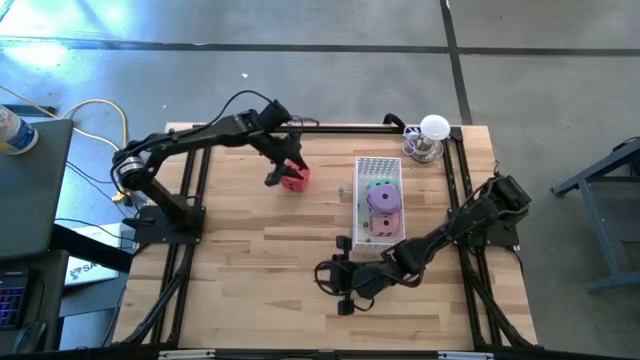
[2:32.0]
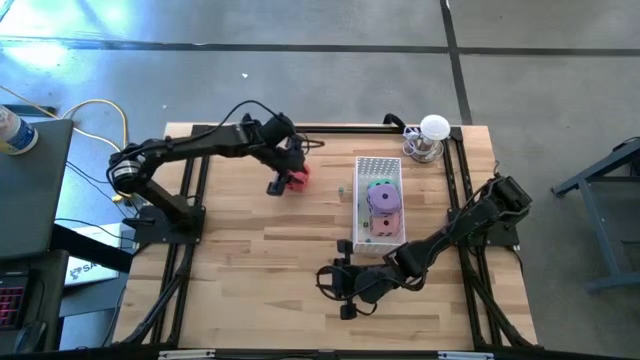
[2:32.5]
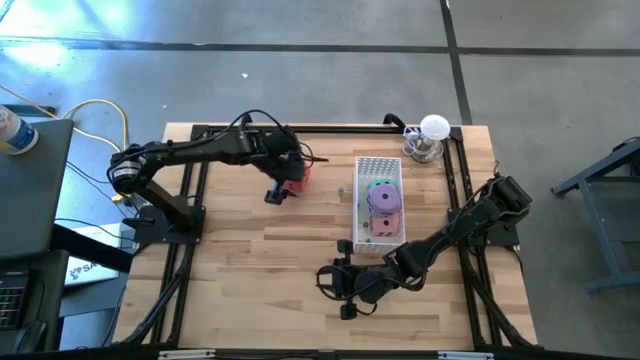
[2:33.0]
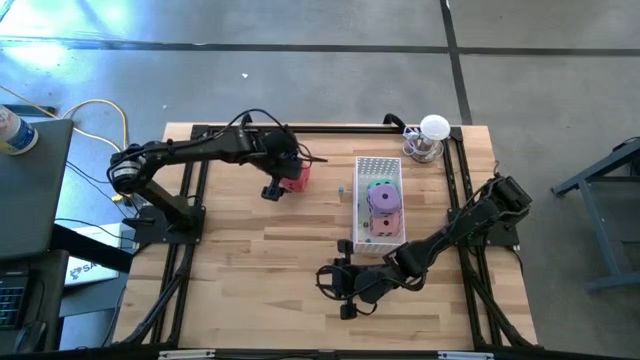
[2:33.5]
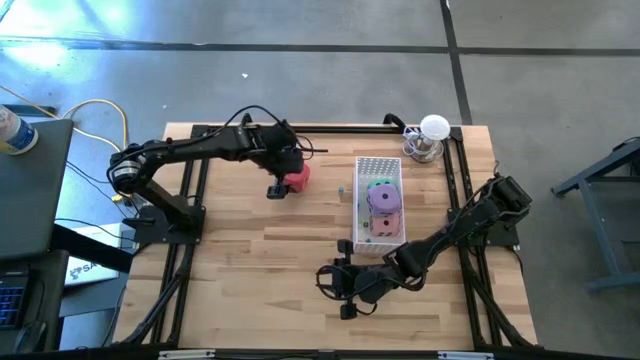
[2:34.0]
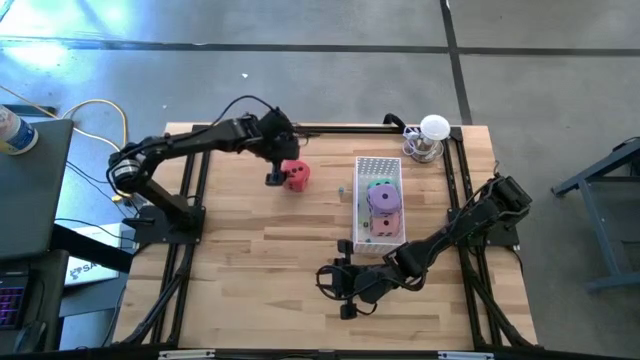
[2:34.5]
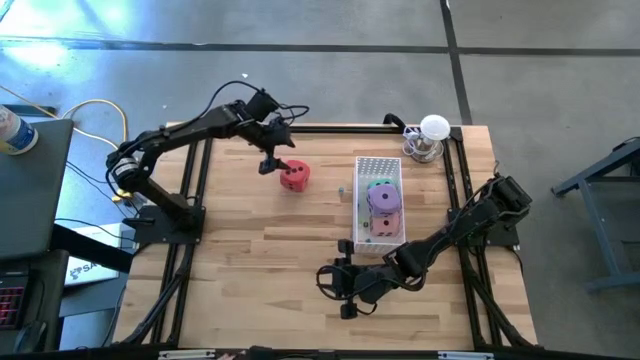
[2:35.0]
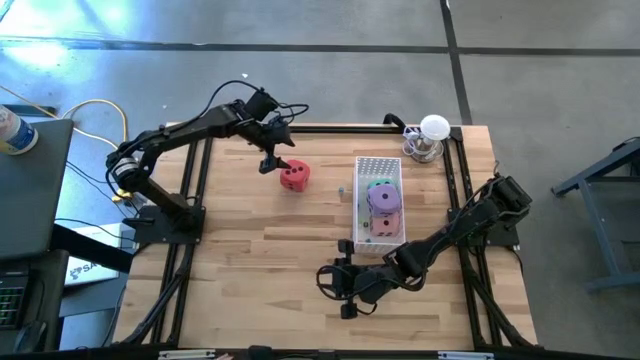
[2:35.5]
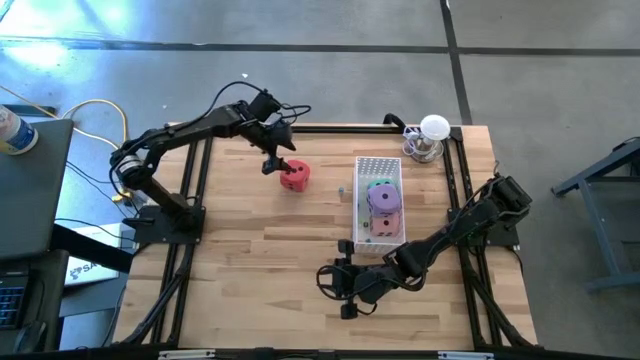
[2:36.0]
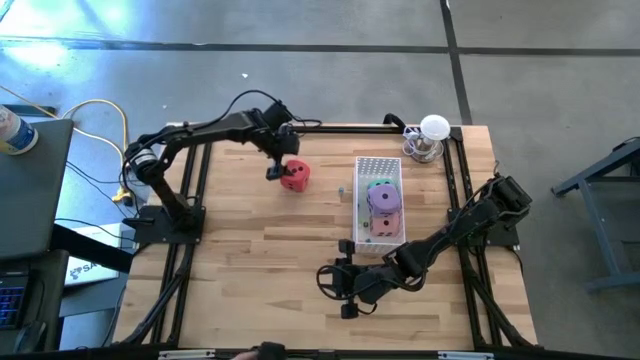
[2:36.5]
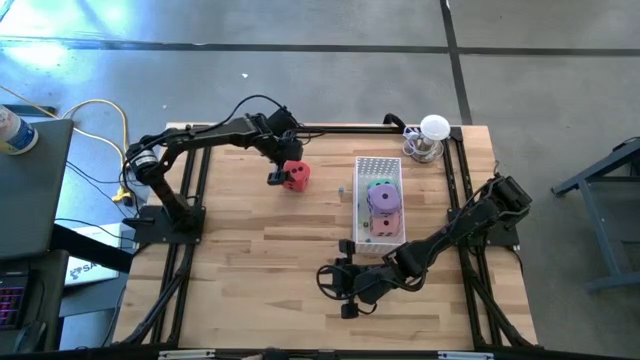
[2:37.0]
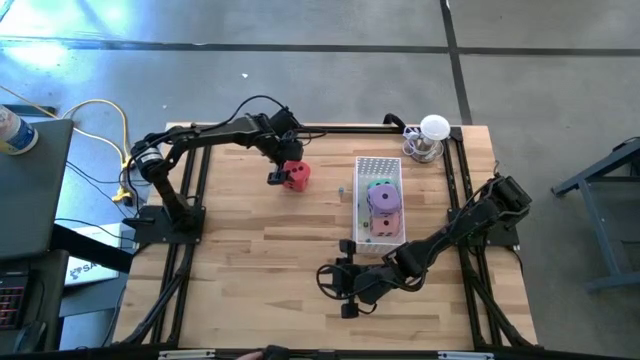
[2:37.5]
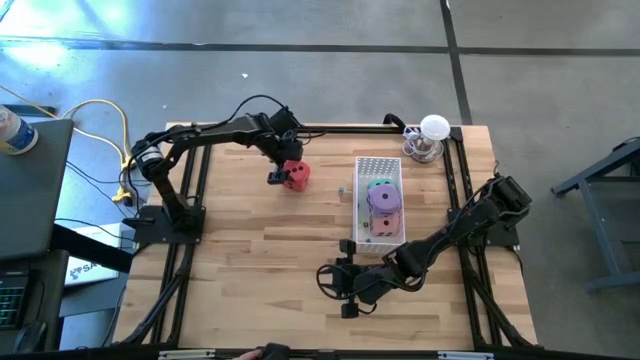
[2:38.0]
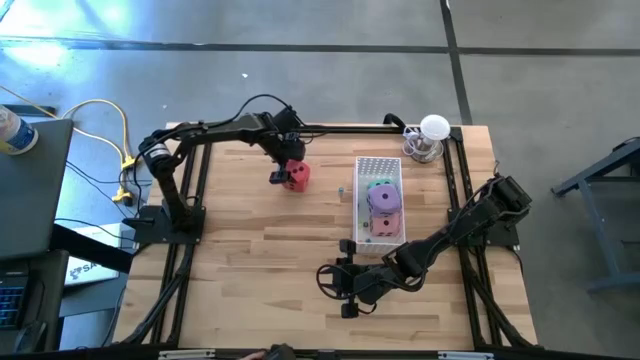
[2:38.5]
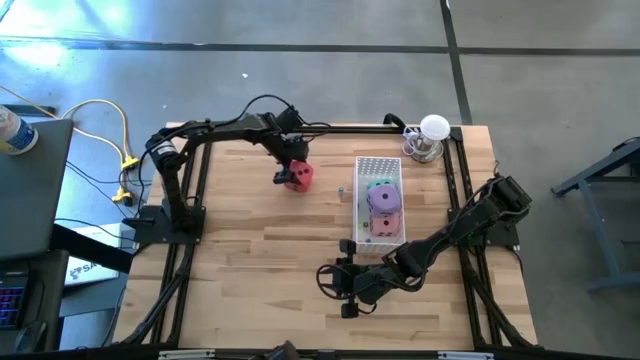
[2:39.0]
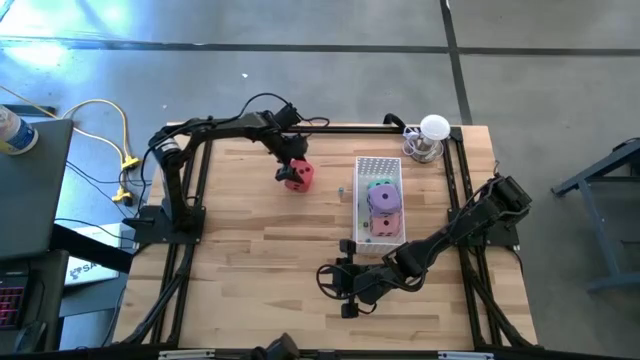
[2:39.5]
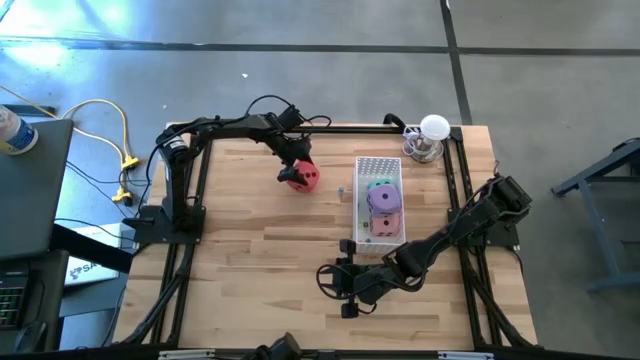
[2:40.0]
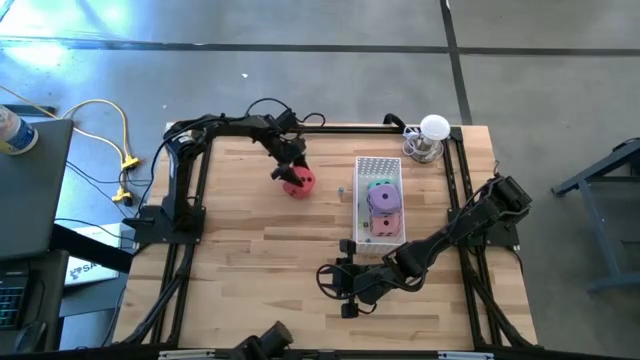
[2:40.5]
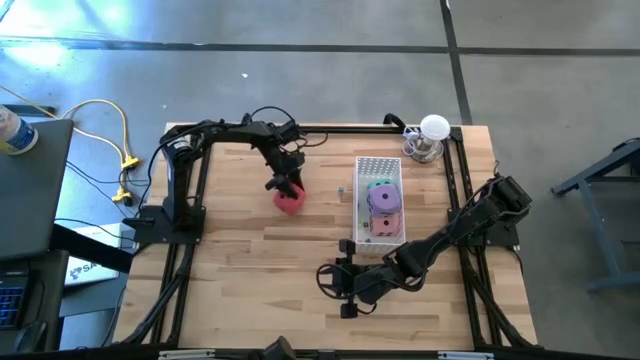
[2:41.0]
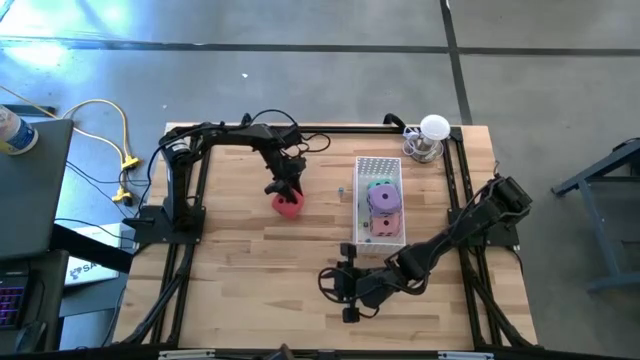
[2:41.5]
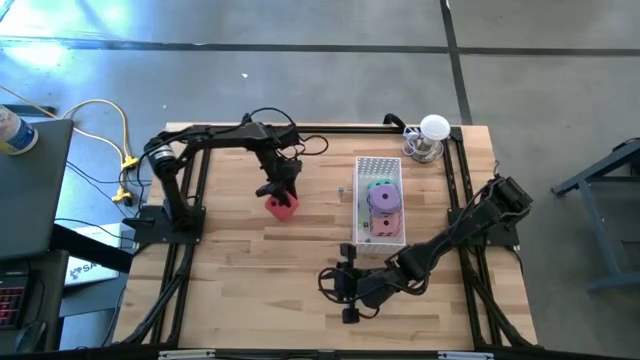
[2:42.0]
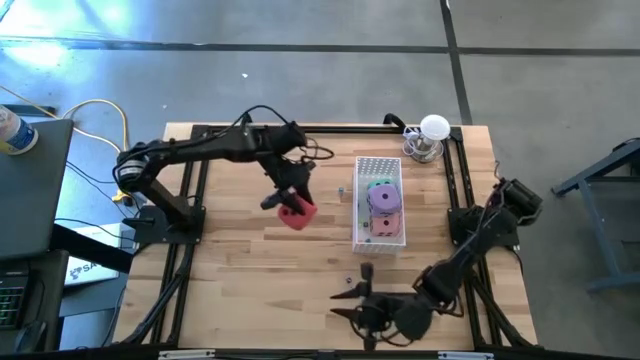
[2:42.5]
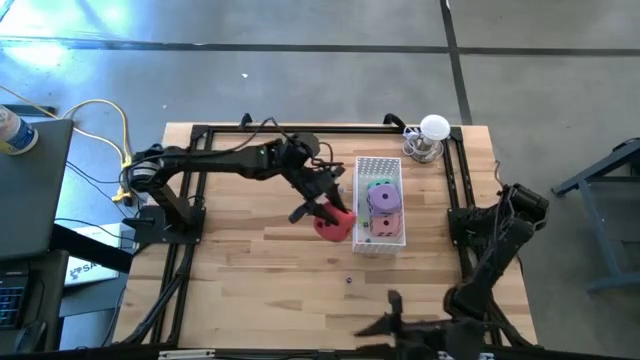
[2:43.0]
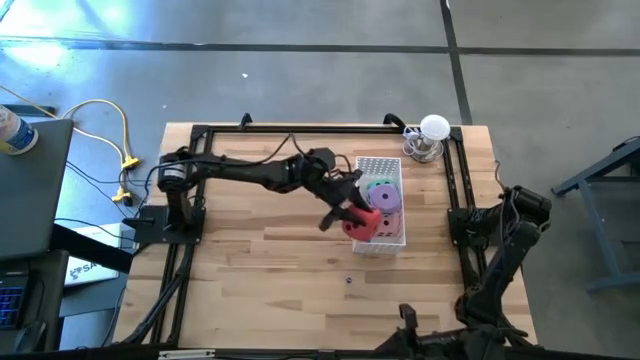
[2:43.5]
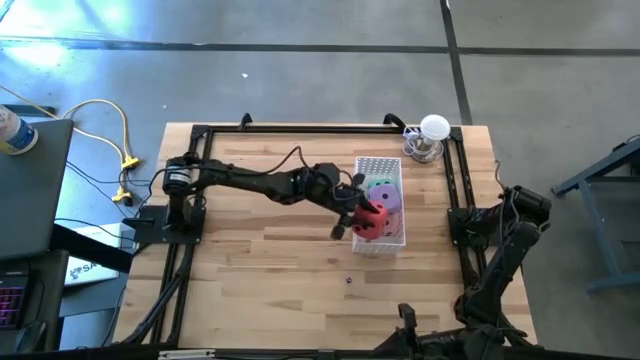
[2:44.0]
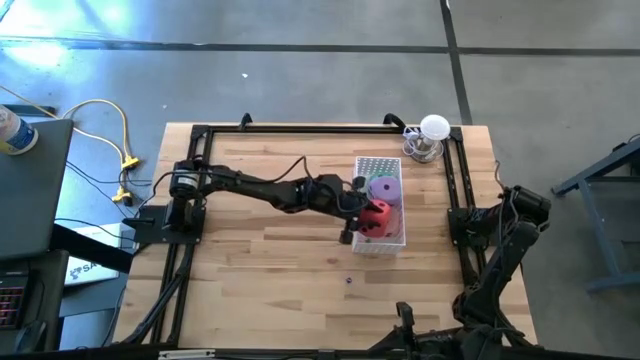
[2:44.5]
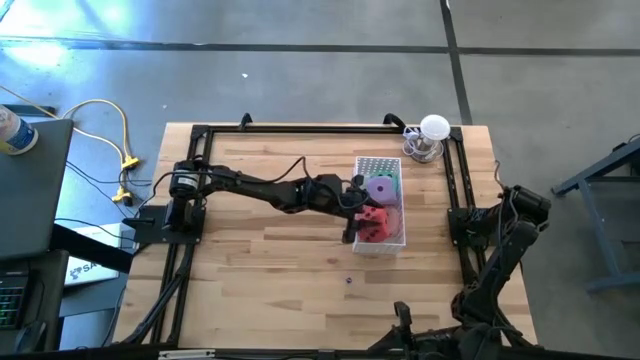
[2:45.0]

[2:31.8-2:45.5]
Task: Pick & Place Dice
Put the red die into the white bin

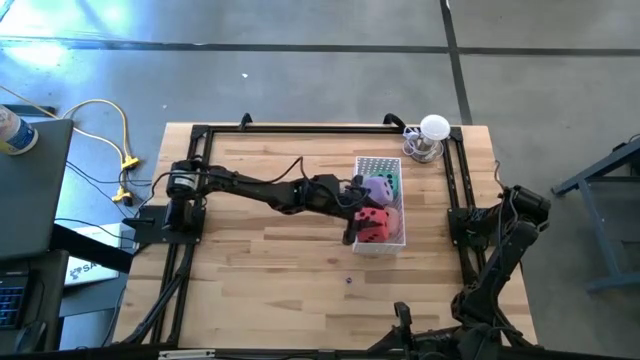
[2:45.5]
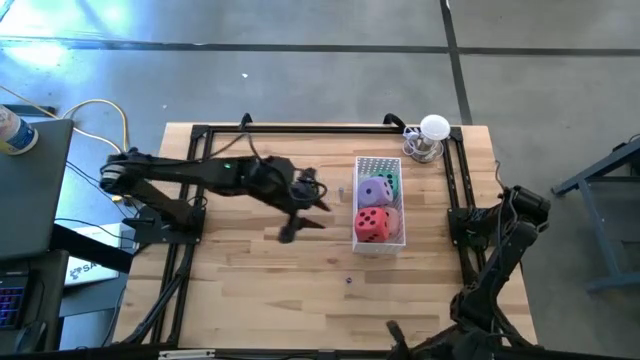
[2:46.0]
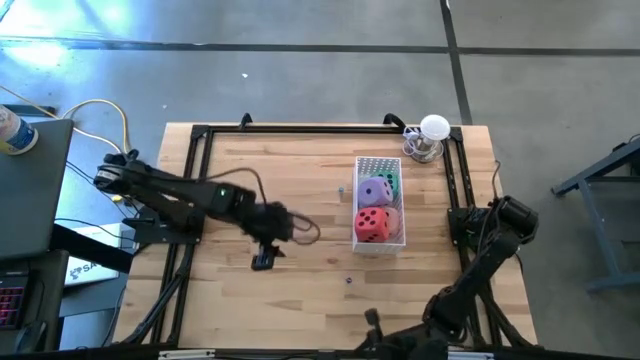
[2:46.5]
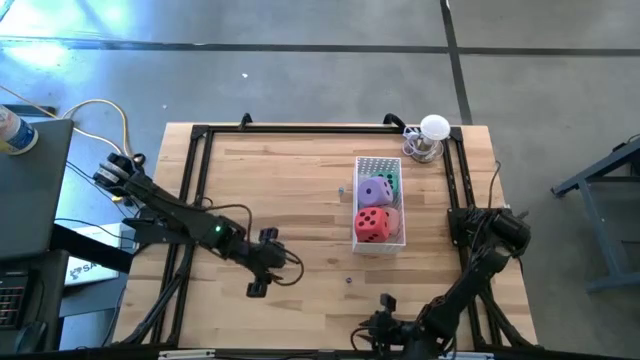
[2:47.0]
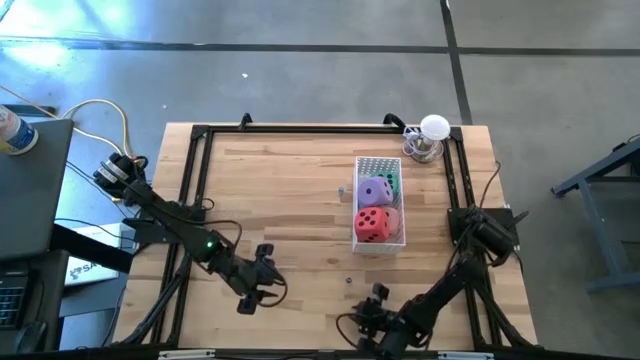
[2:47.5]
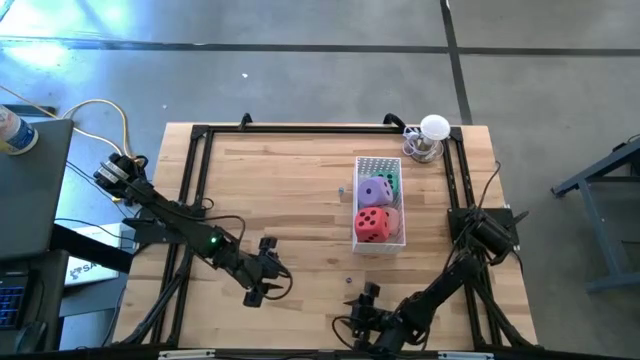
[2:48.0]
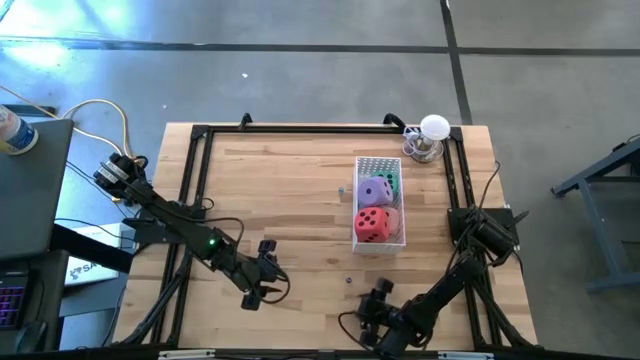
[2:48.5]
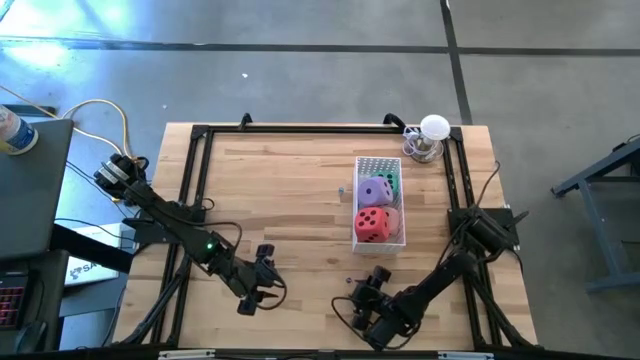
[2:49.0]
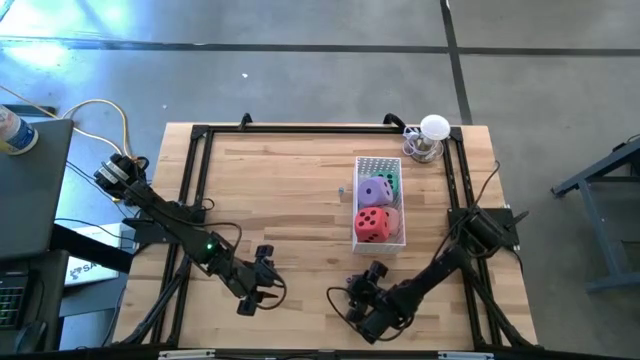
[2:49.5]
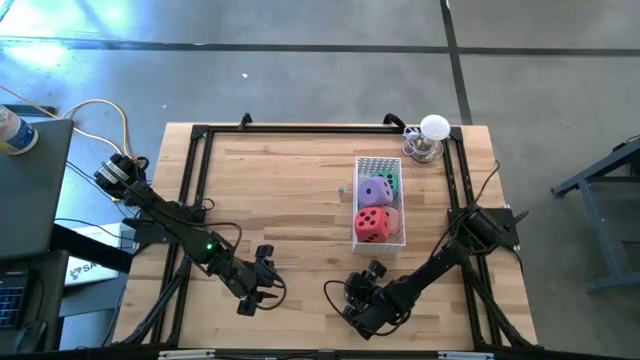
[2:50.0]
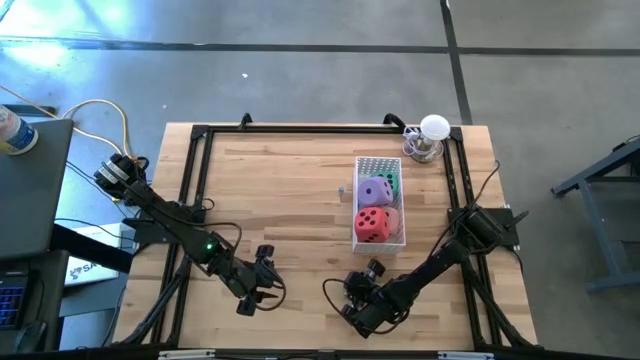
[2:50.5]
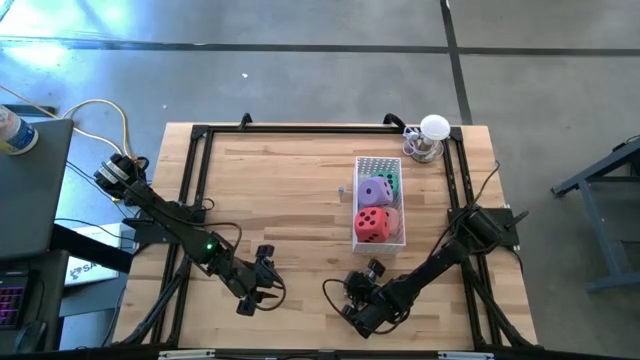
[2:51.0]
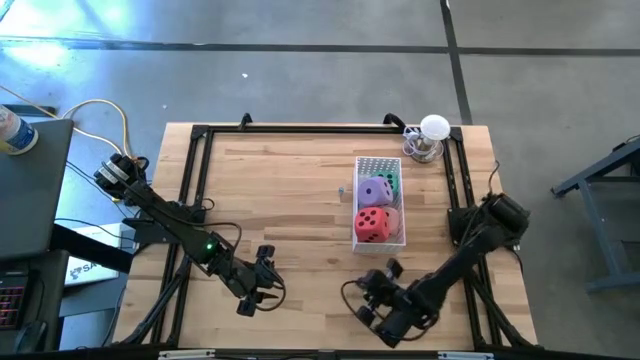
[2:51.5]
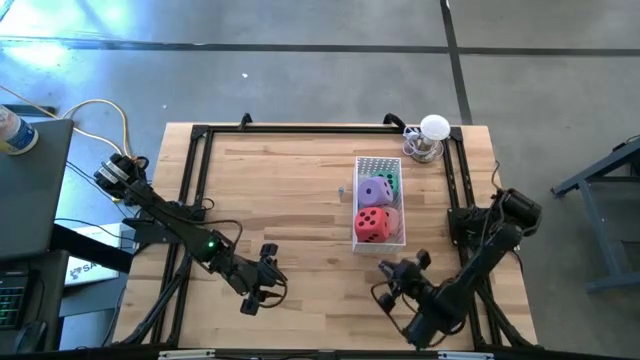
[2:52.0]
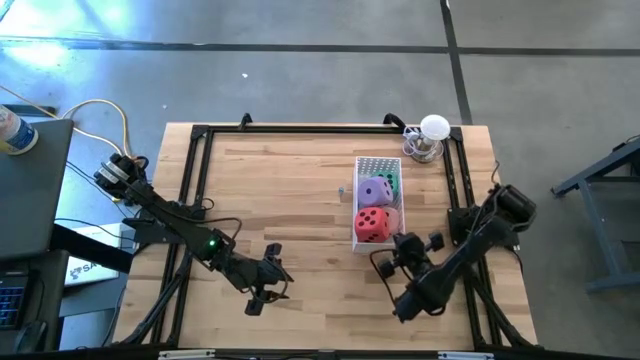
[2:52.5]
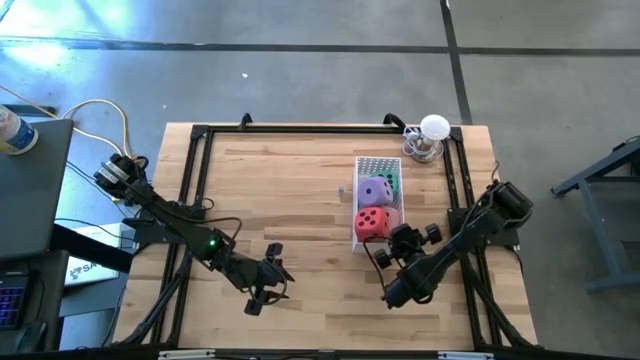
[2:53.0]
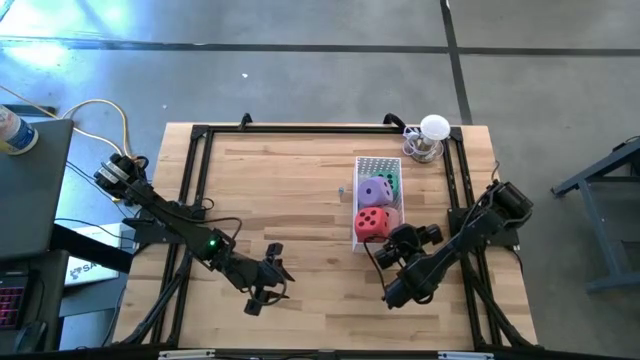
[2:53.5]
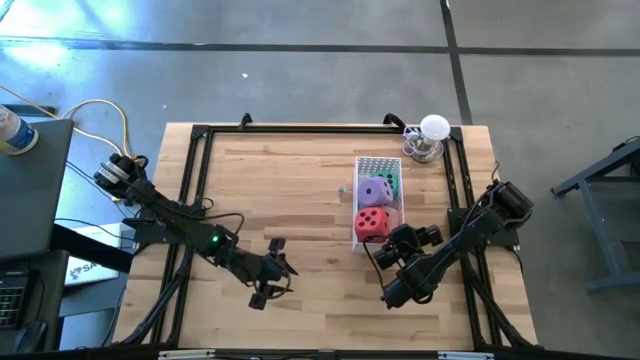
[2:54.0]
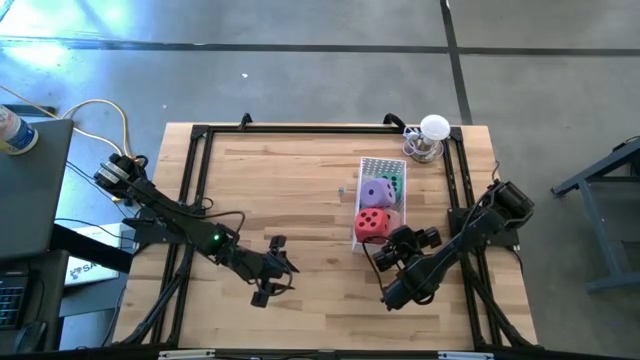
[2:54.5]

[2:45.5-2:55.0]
Put the blue die into the white bin
